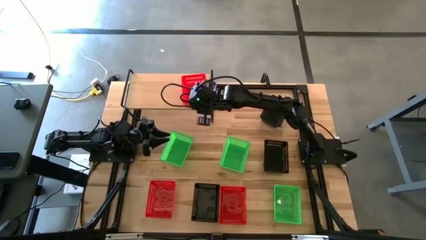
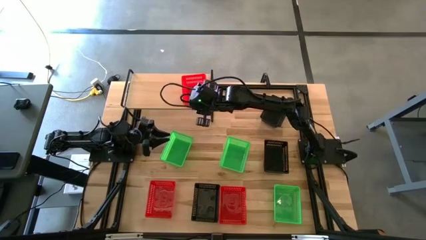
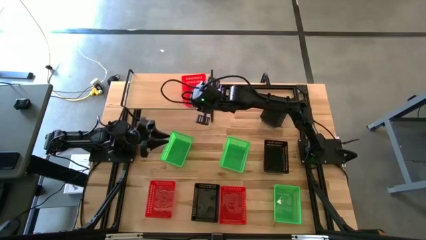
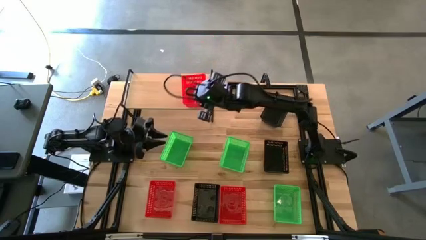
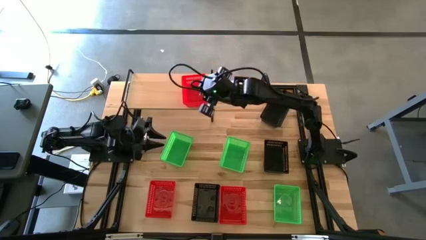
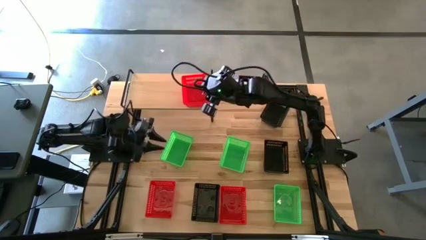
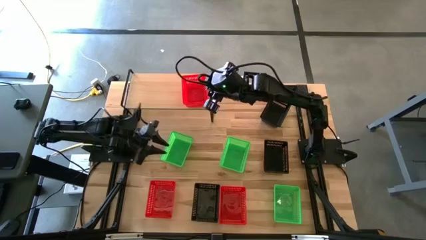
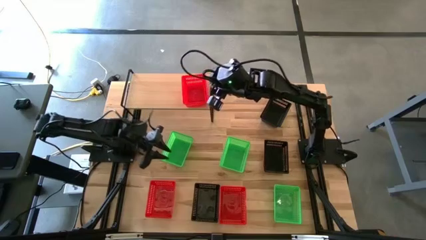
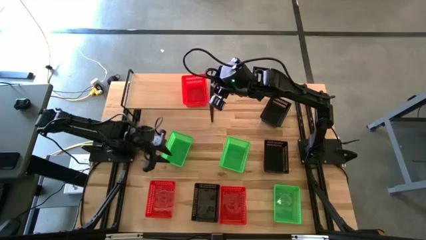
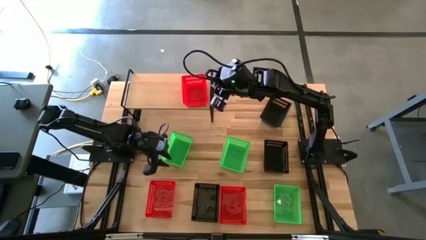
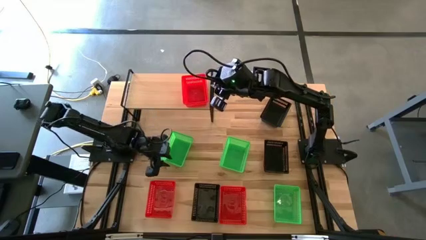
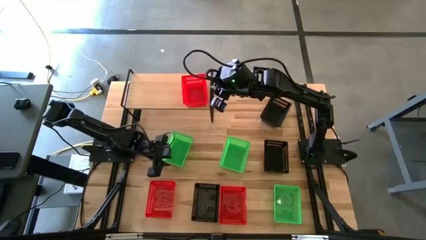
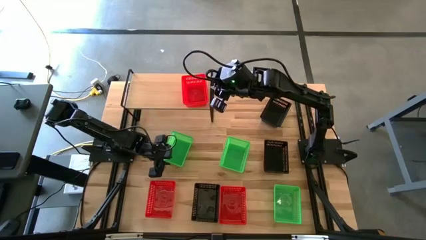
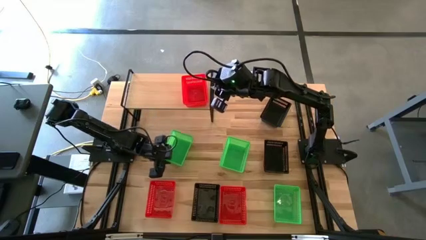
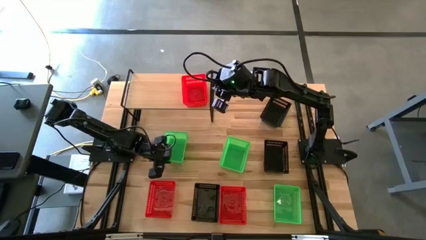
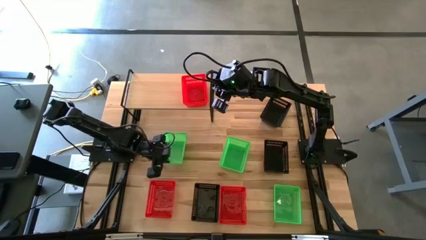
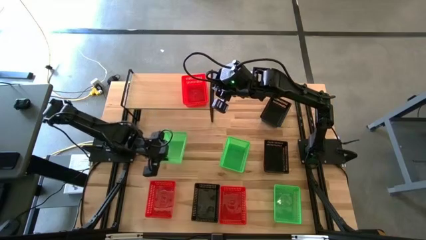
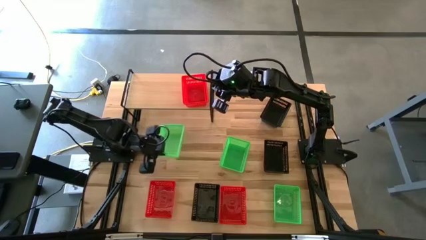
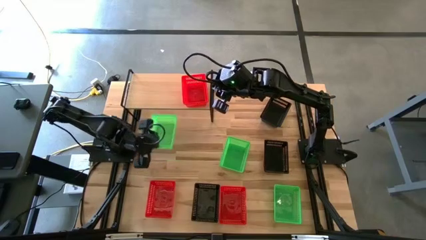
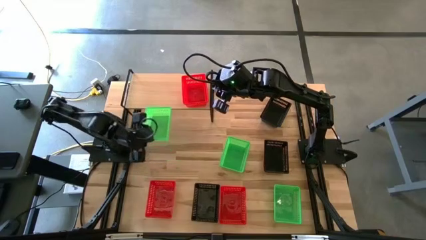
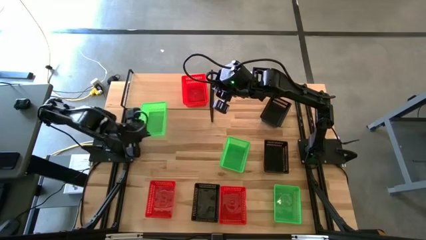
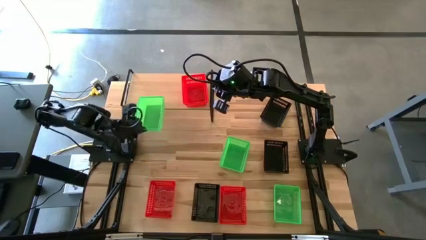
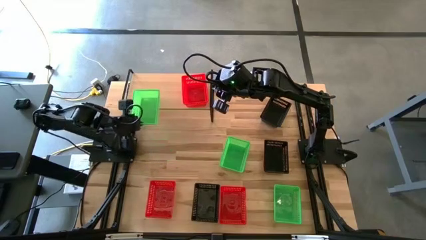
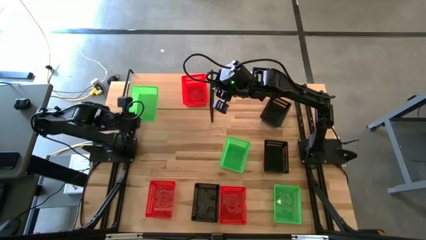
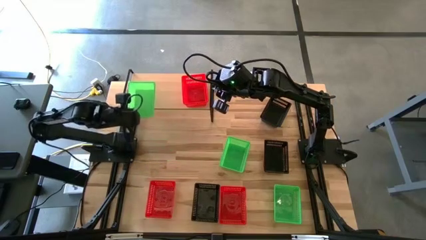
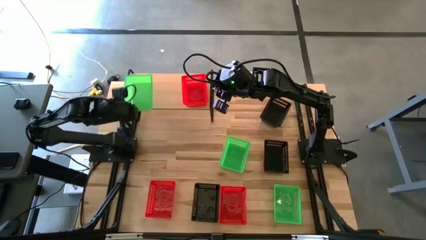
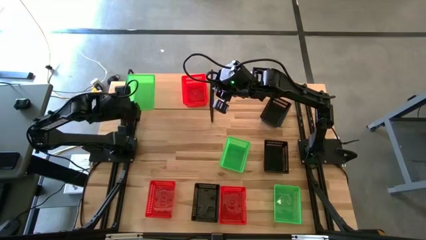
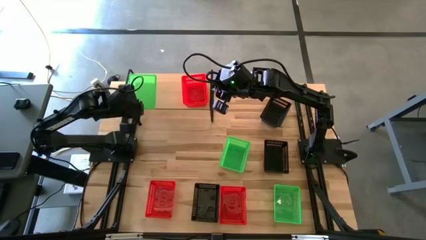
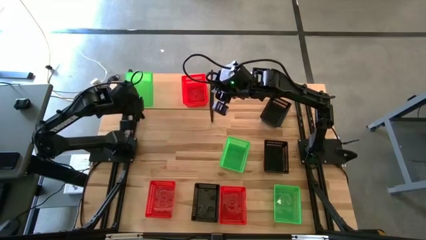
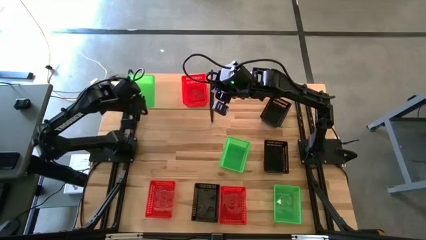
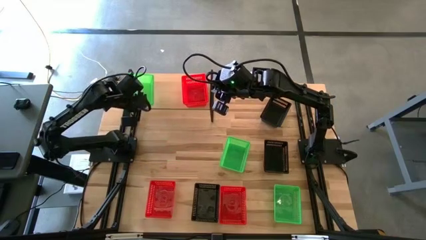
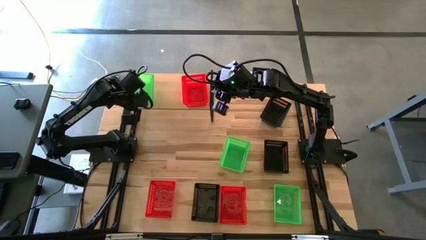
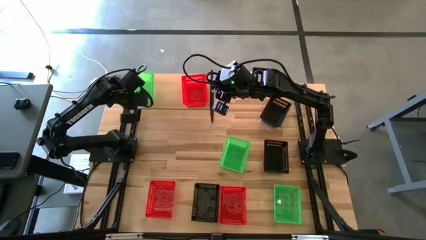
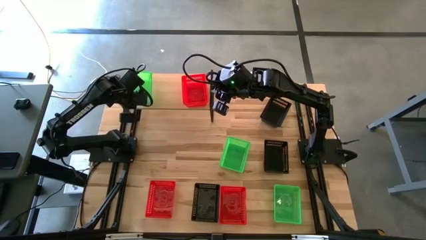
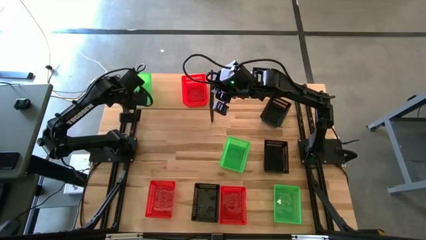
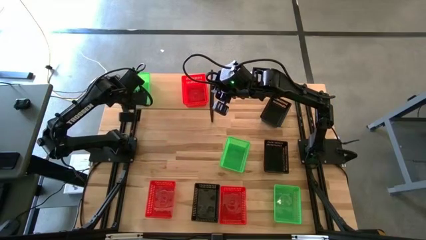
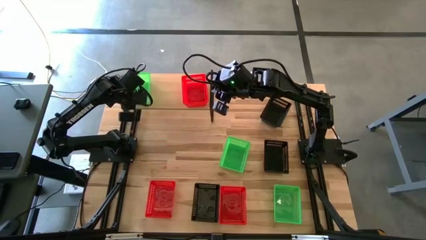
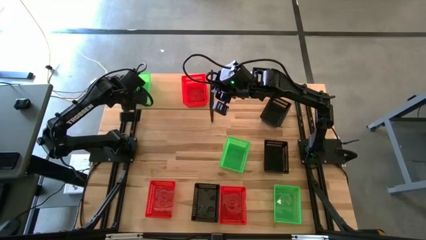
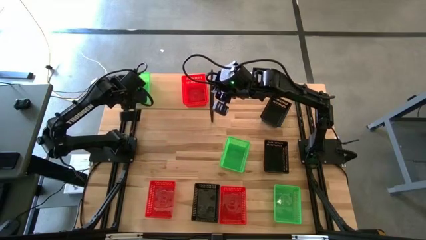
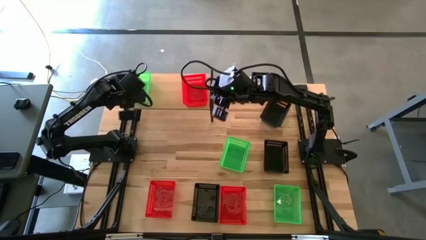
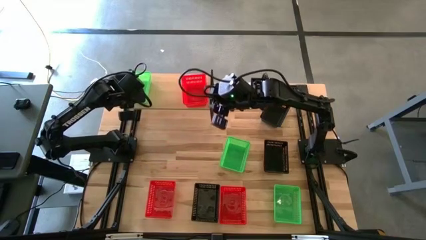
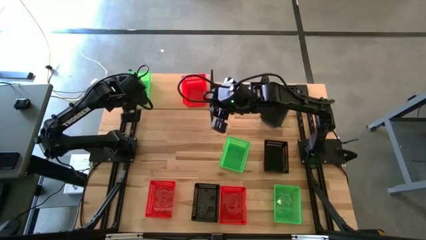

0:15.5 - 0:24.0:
Task: Stack baskets on shelf by color
Put the left green bin on the shelf

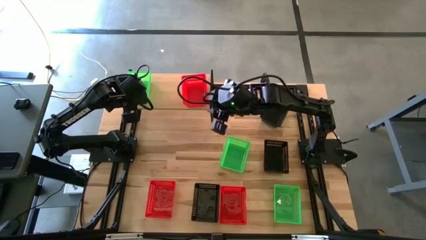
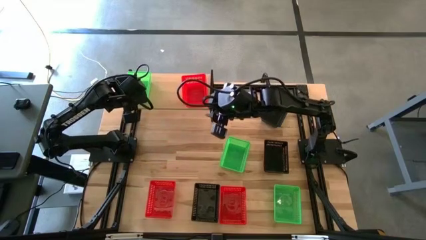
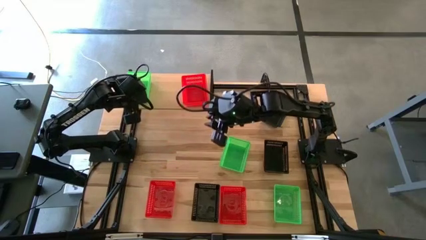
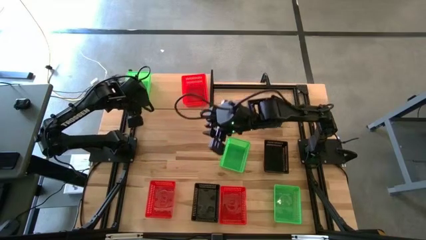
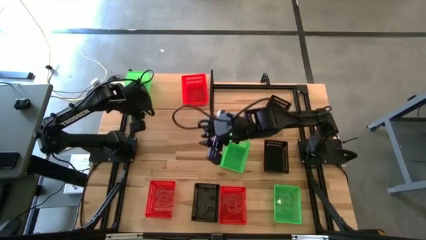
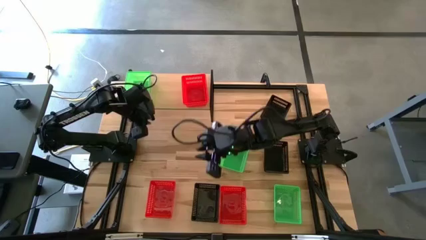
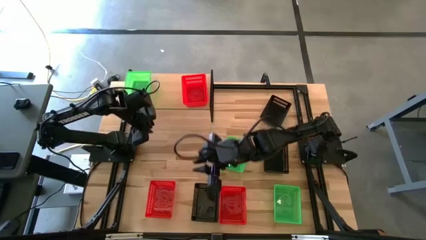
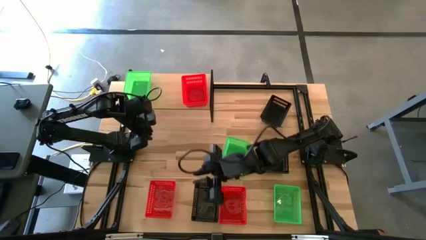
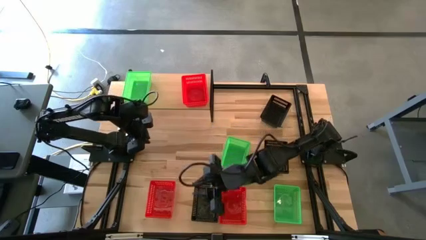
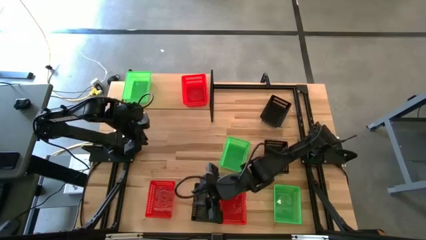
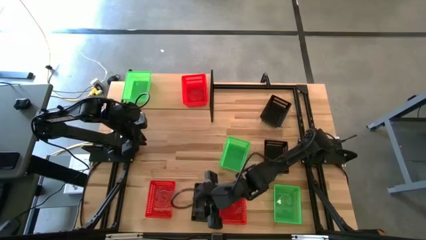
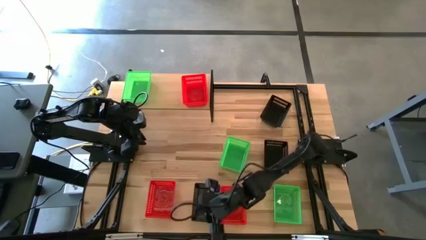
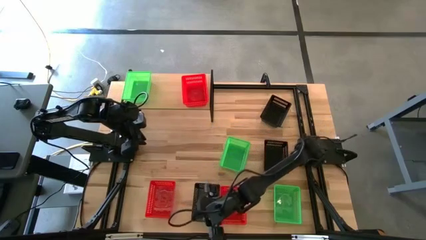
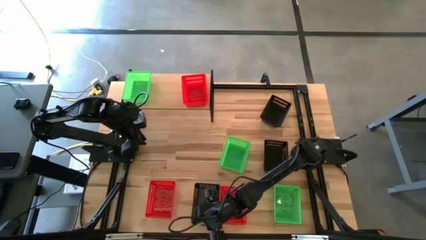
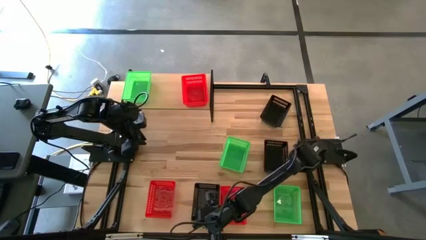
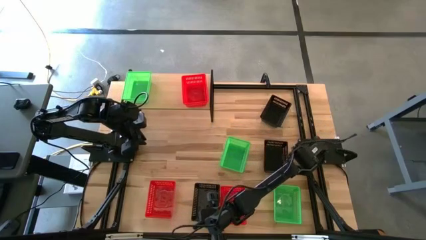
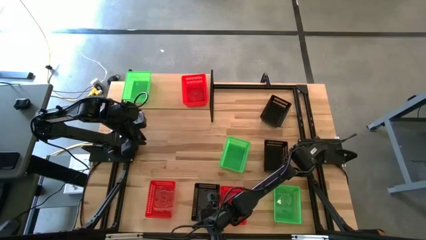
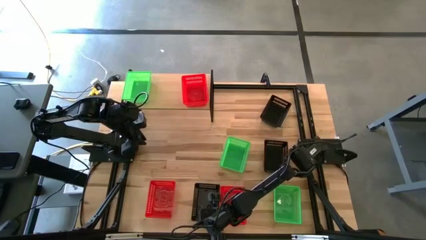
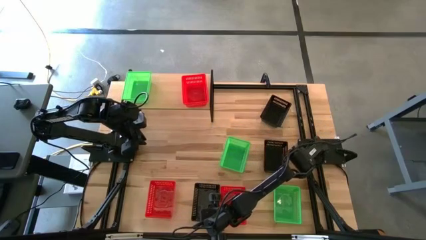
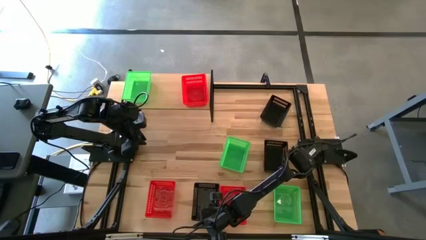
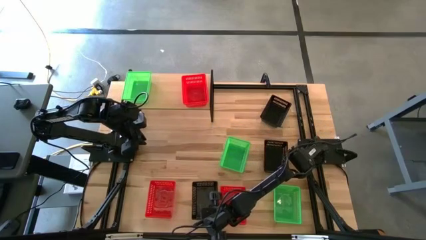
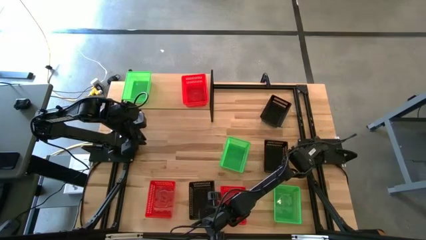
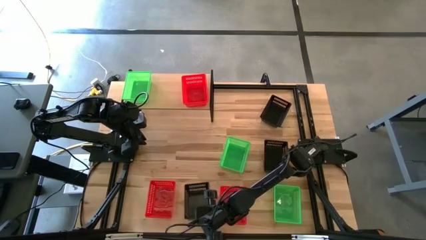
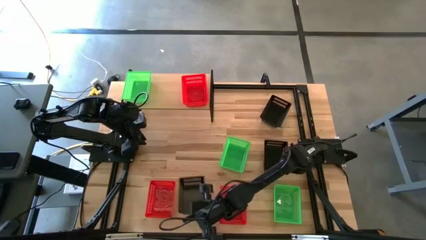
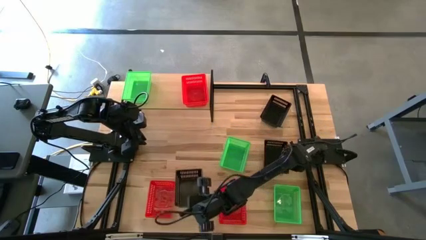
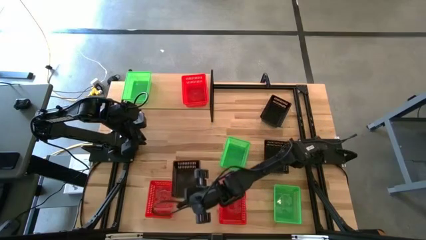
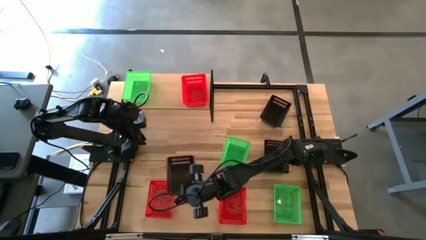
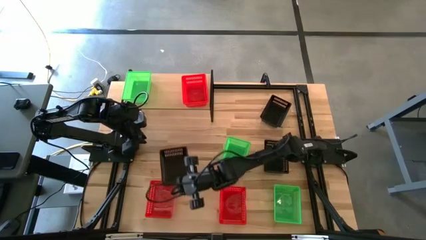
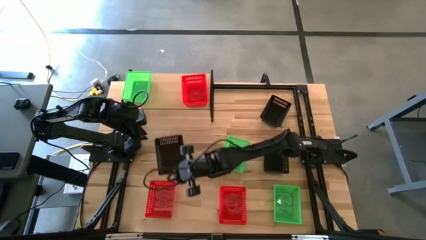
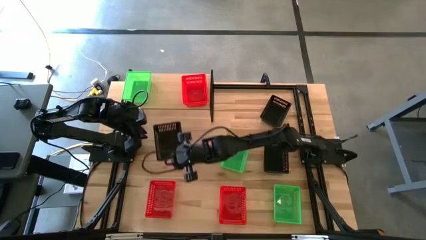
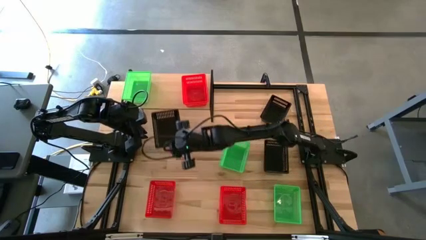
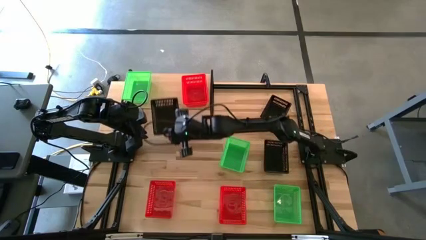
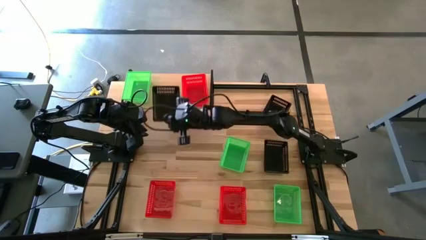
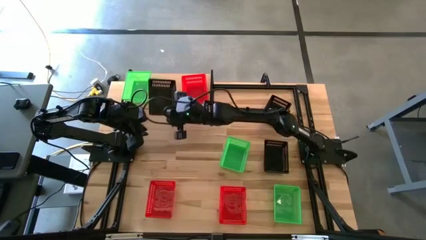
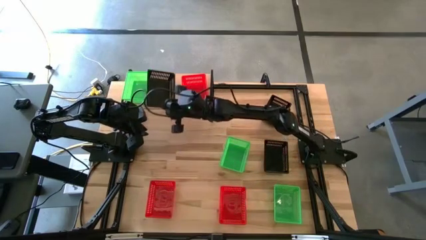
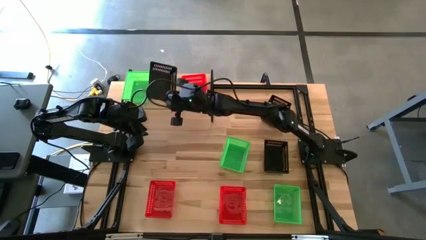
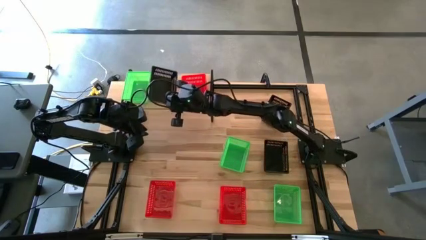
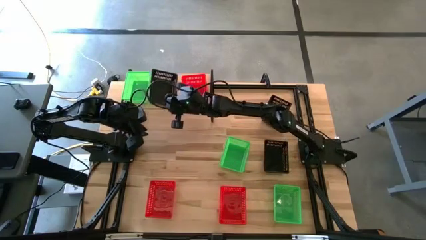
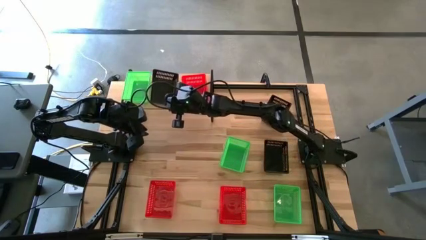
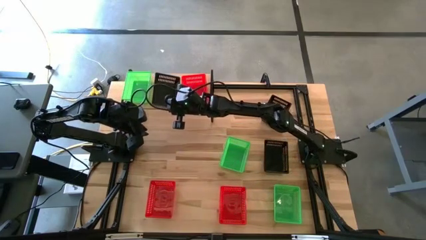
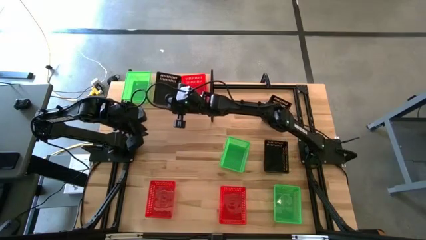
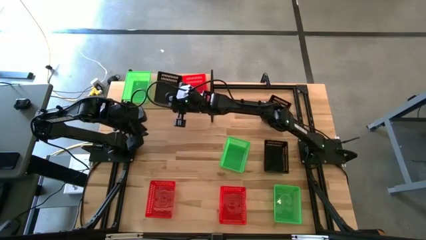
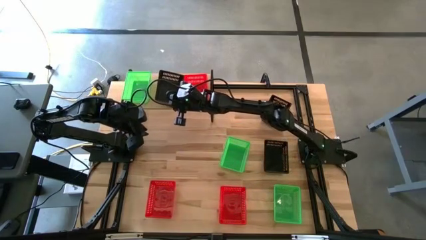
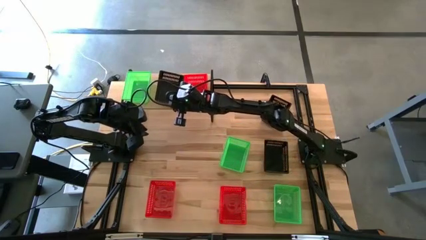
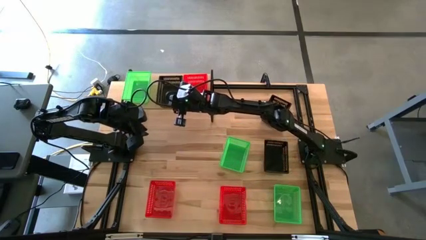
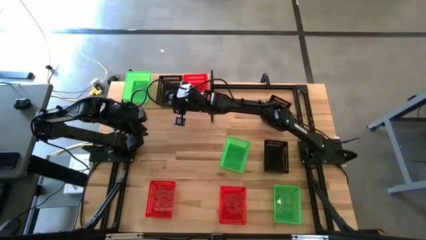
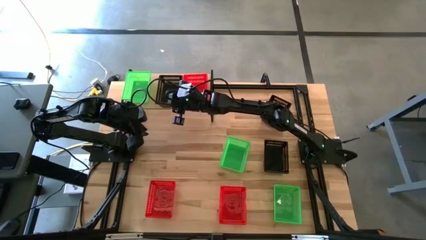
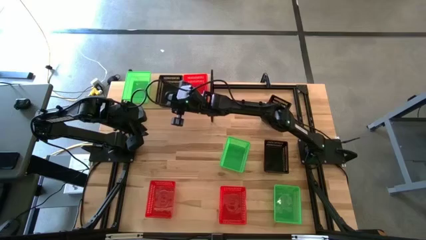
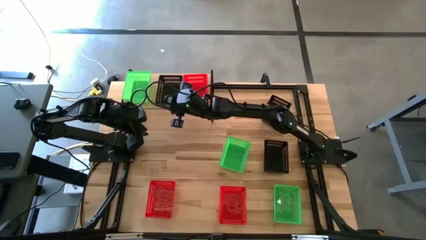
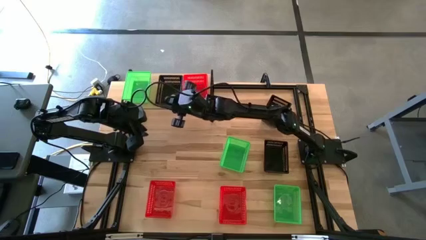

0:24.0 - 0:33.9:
Put the bottom center black bin on the shelf
